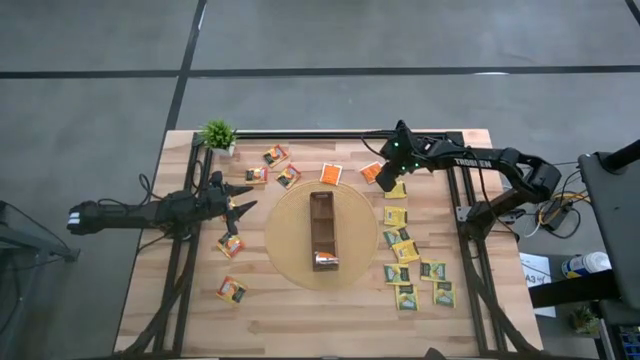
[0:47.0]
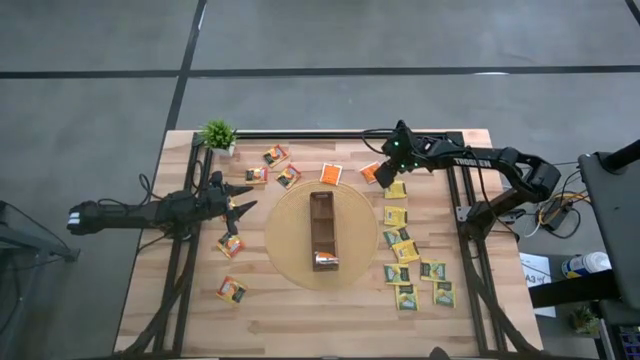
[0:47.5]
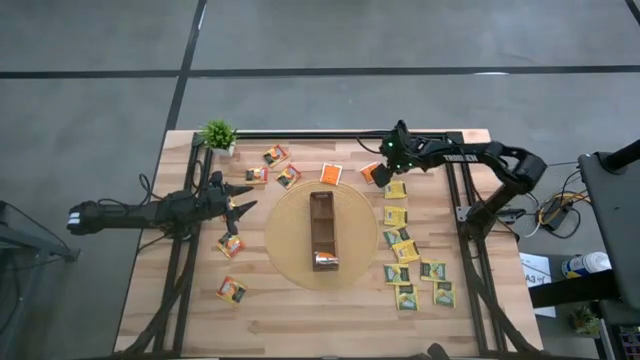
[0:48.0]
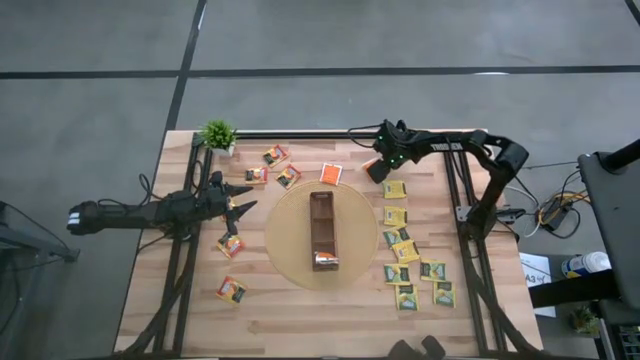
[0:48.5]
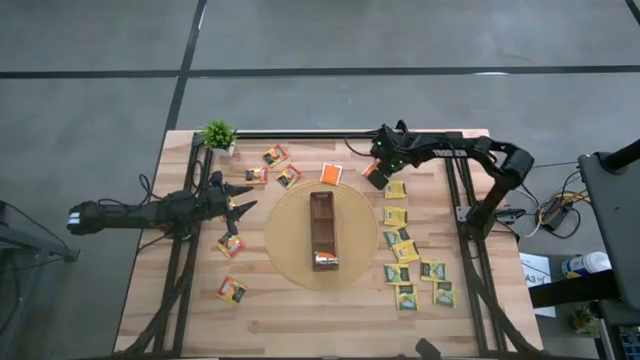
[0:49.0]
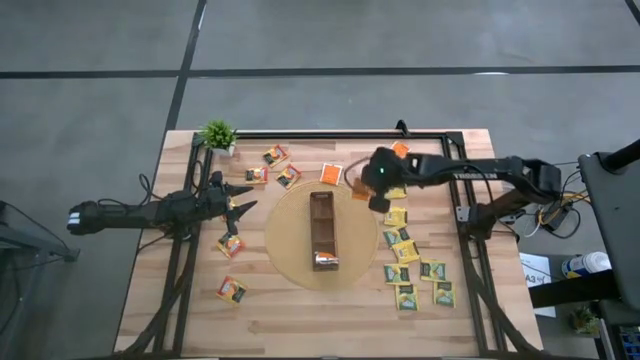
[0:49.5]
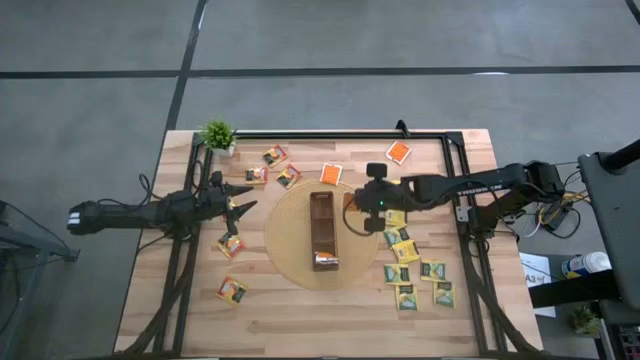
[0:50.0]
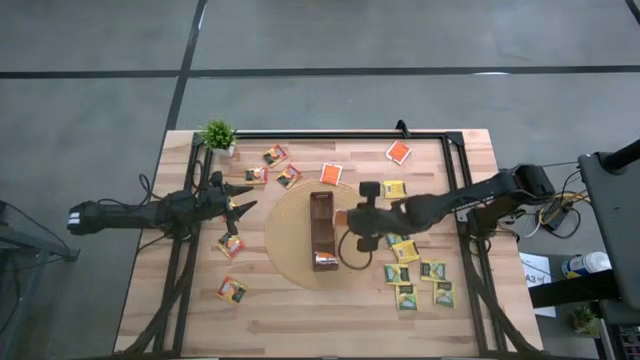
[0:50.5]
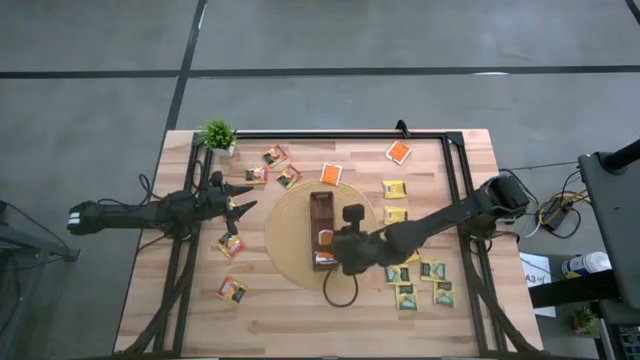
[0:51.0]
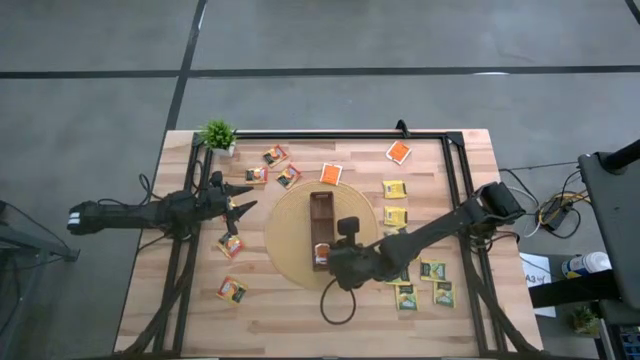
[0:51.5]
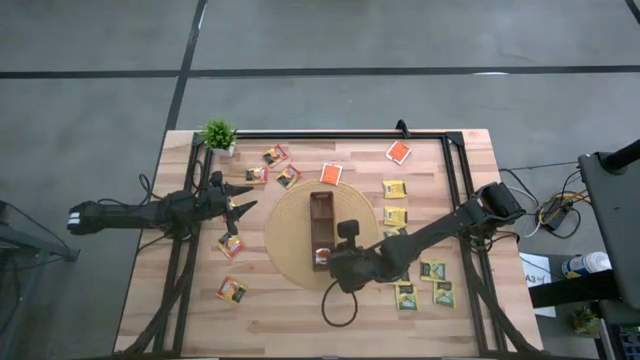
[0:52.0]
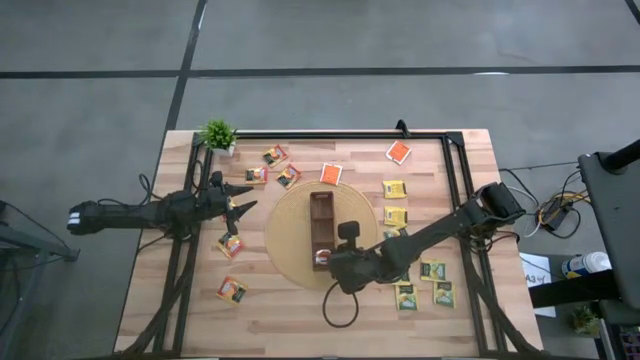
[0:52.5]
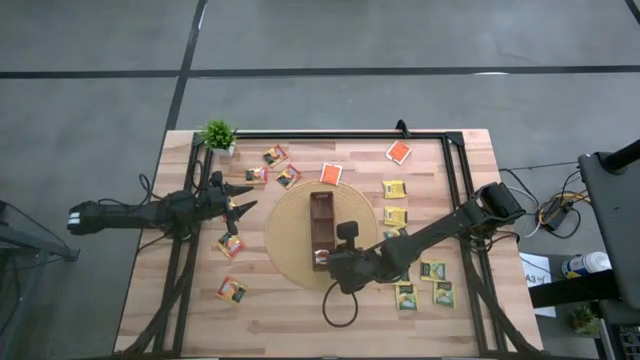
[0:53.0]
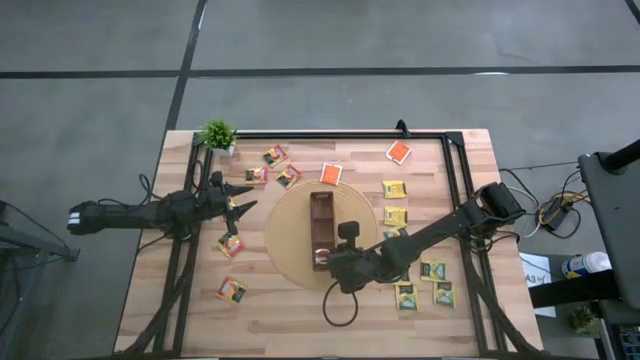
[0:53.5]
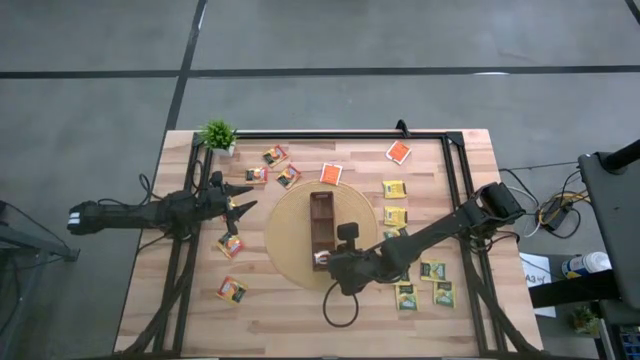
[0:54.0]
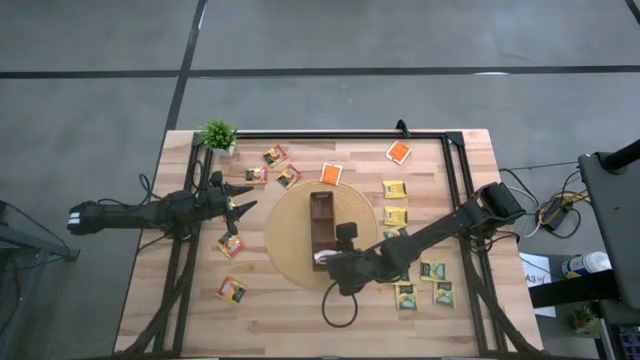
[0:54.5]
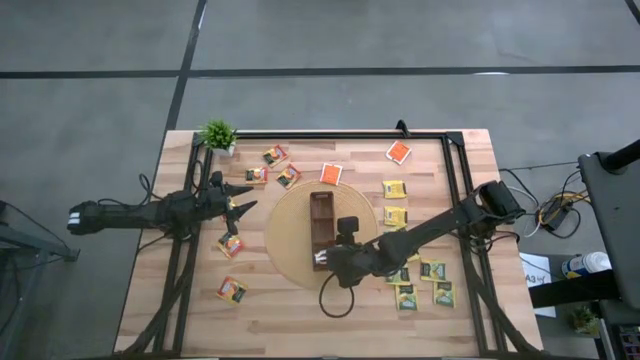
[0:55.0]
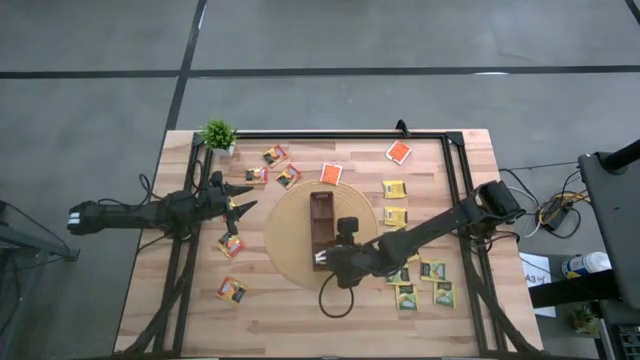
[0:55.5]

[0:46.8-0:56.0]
Task: Pick & Place Tea
Put the middle white tea bag into the bottom section of the wooden organizer

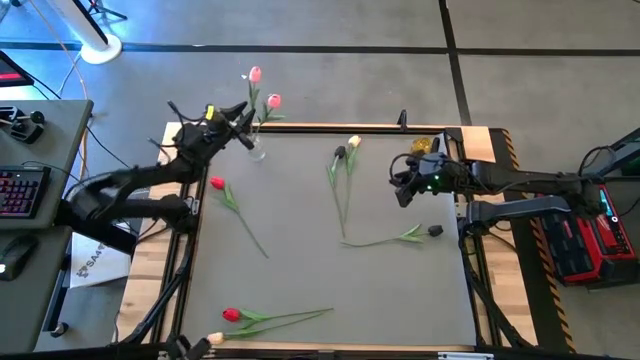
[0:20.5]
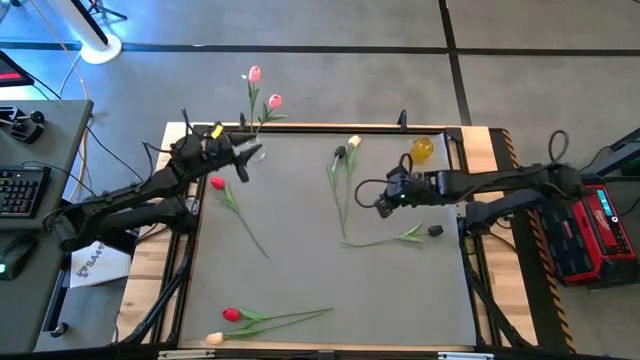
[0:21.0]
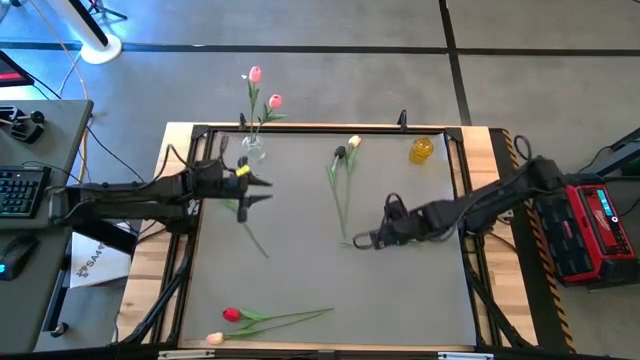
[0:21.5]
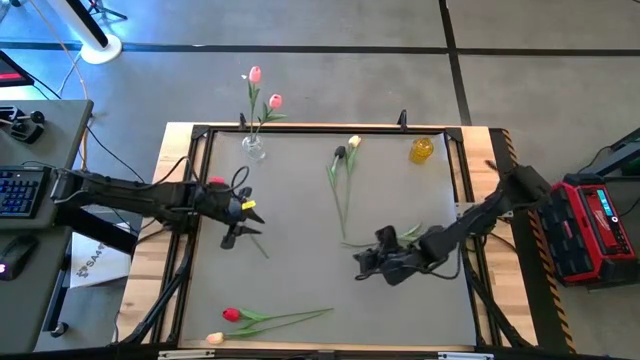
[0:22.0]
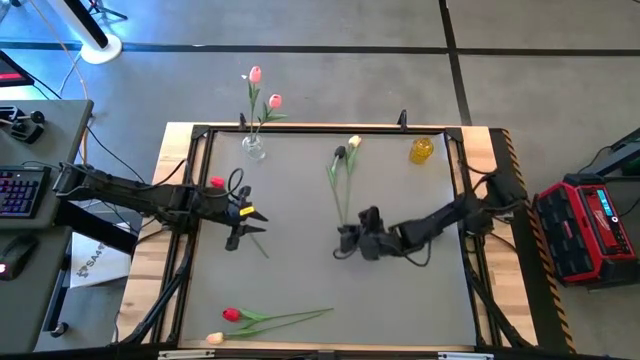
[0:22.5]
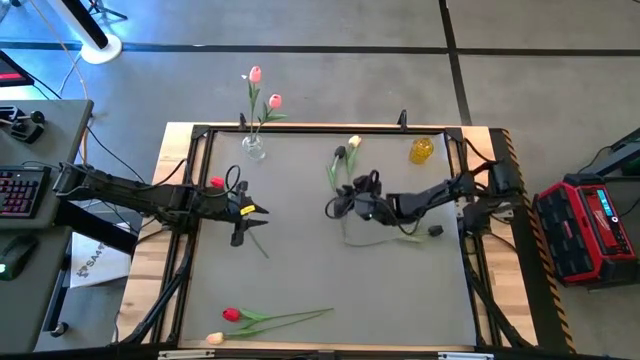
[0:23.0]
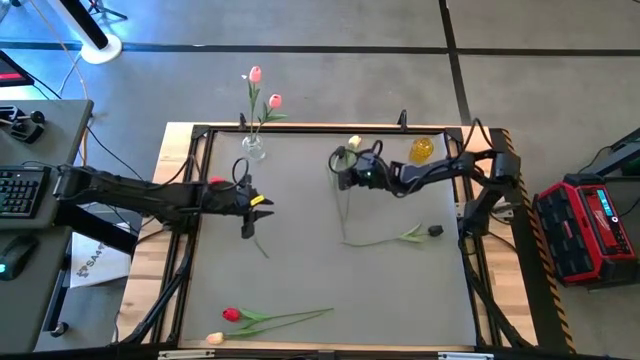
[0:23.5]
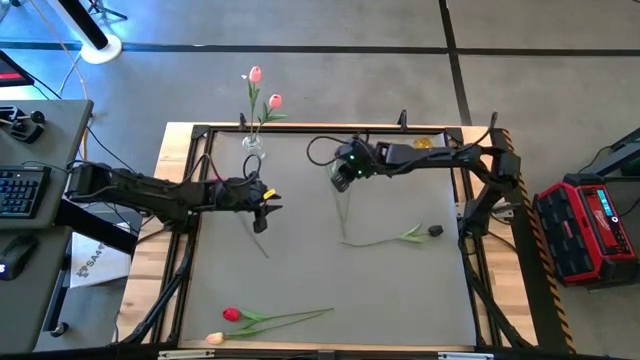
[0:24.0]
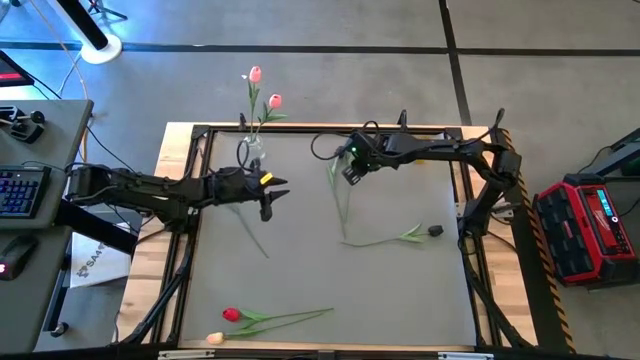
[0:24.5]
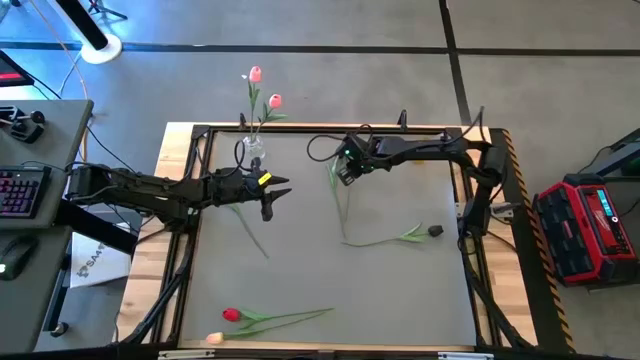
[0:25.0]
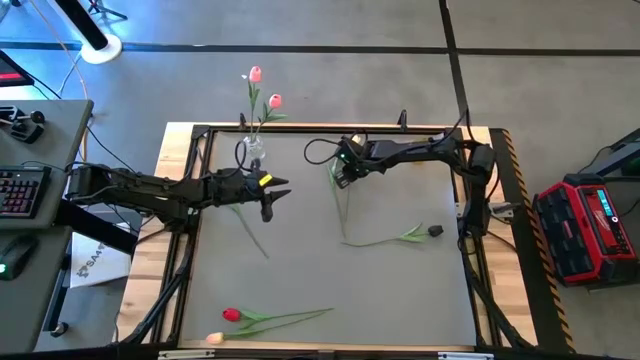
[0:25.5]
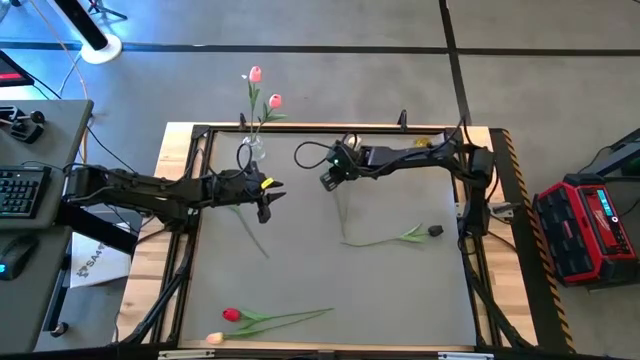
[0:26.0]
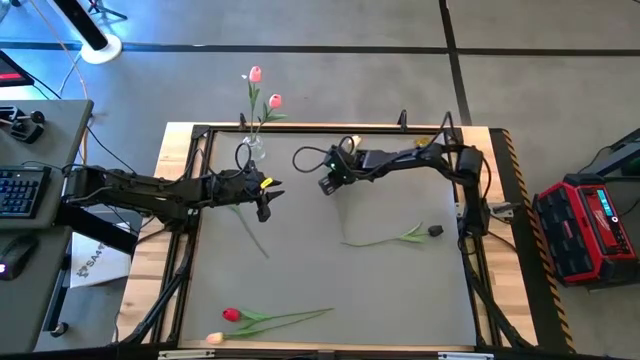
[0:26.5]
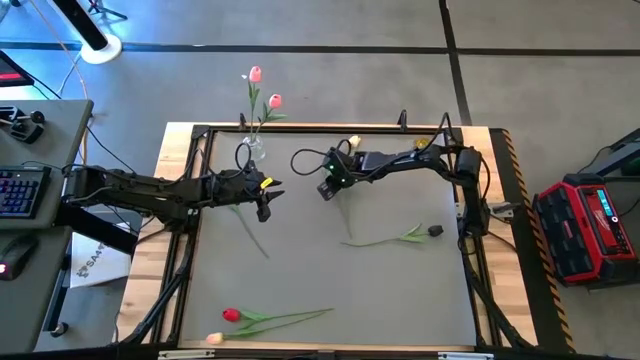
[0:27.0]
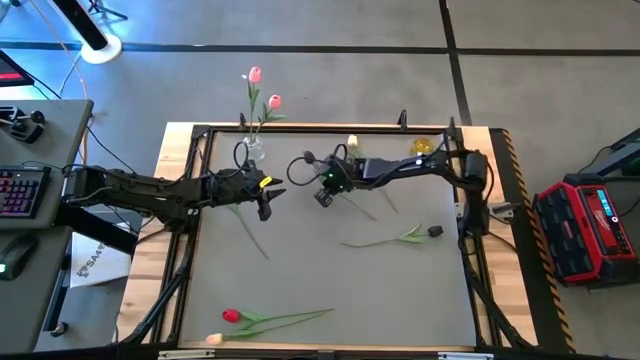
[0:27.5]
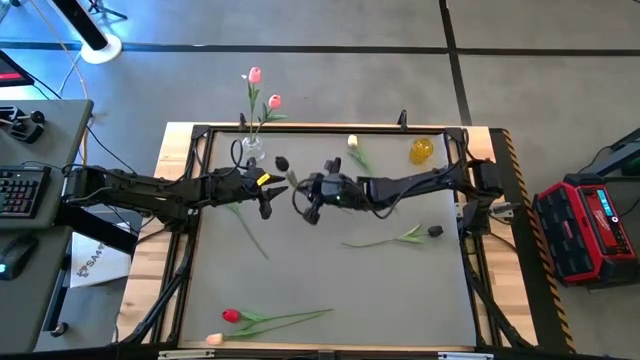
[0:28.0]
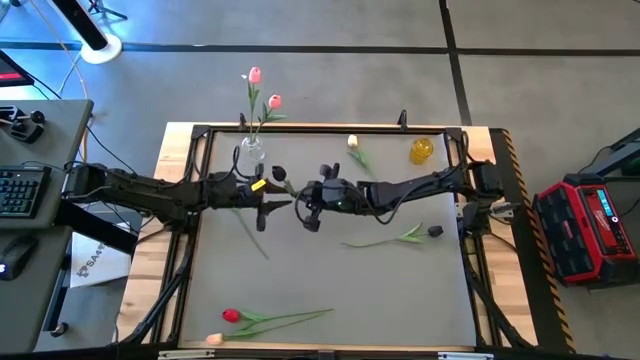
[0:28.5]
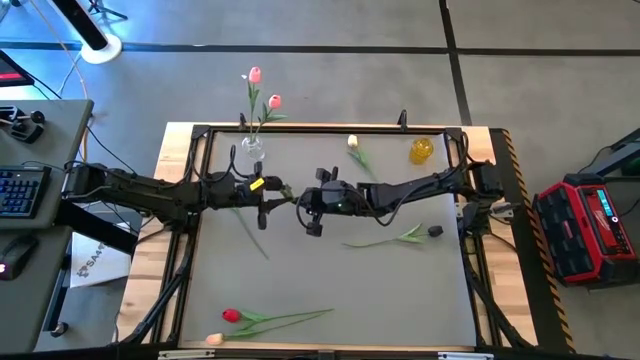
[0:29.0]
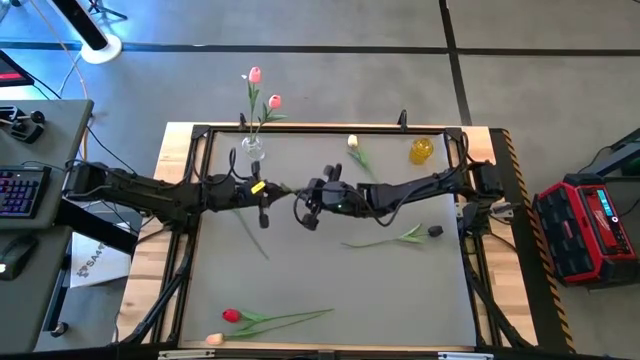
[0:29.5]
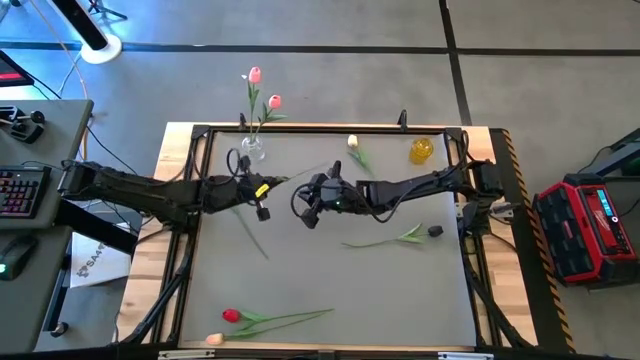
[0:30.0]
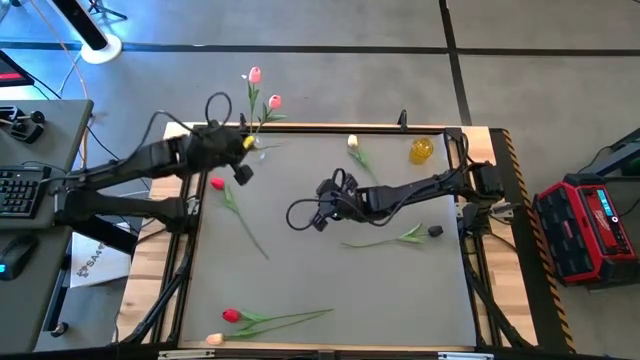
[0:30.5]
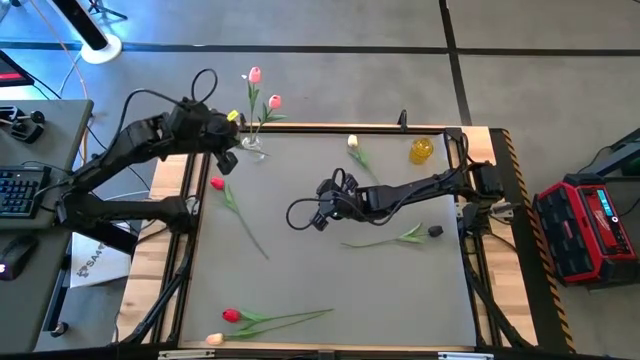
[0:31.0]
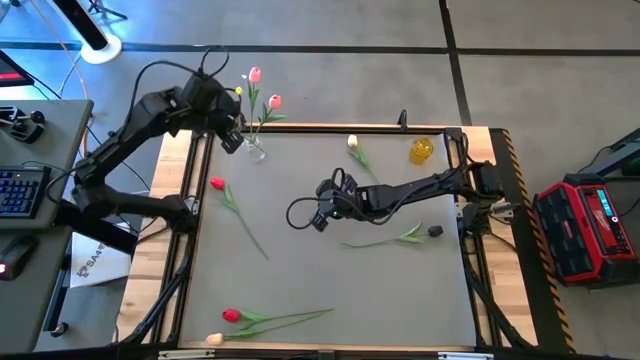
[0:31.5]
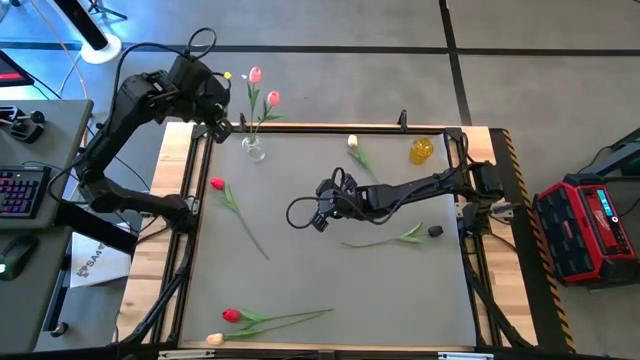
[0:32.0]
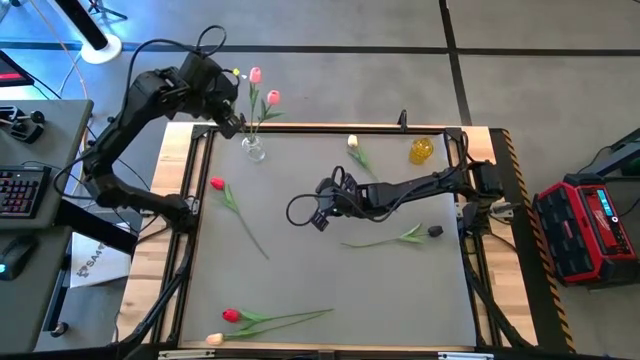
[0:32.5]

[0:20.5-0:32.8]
Task: Sort flowers into vase by color
Put the top black flower into the transparent vase
